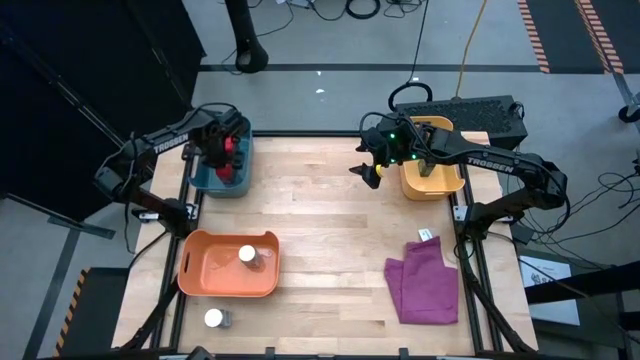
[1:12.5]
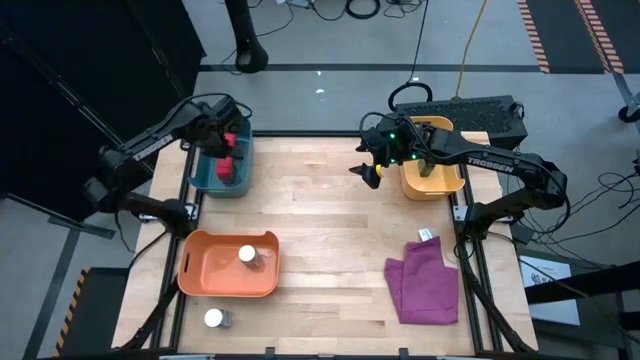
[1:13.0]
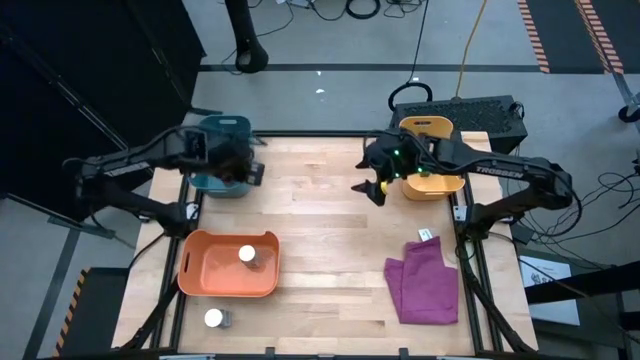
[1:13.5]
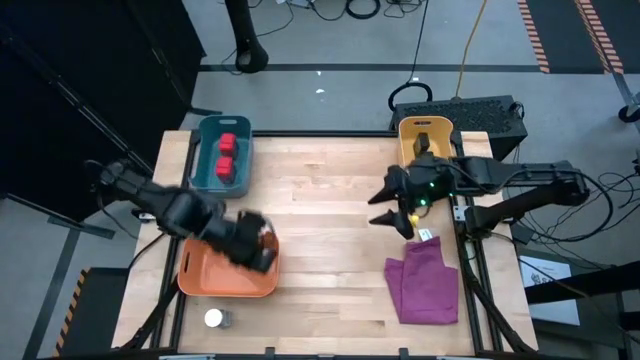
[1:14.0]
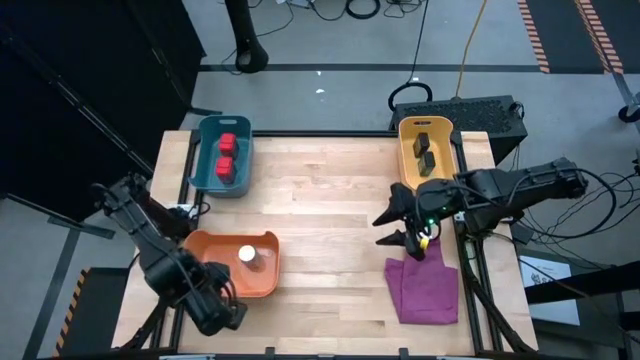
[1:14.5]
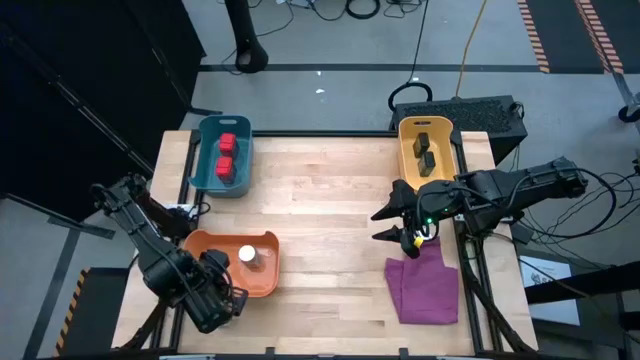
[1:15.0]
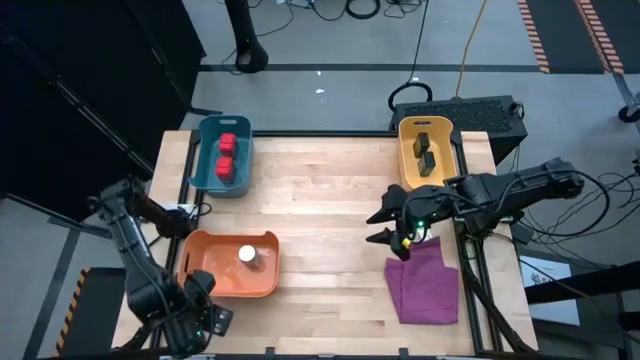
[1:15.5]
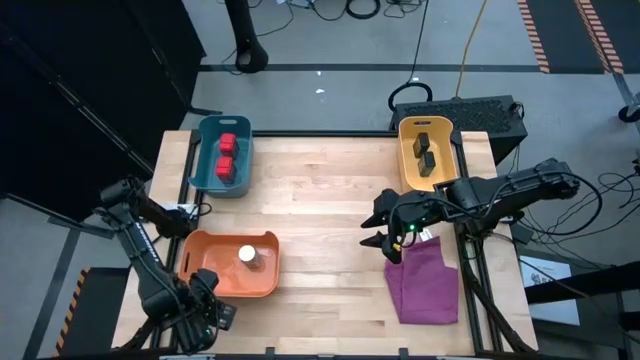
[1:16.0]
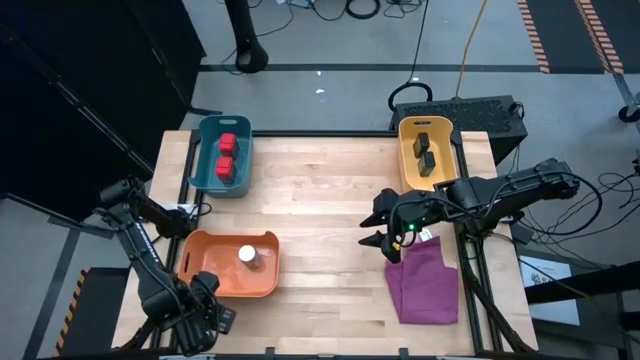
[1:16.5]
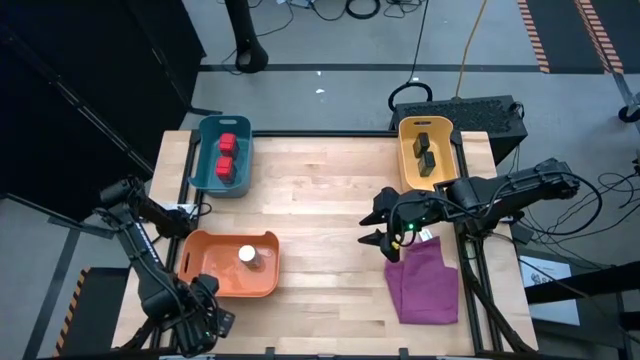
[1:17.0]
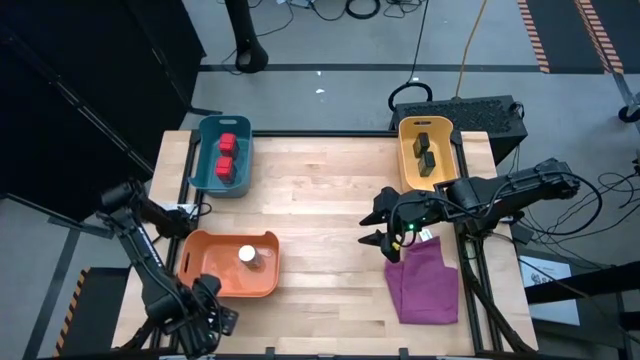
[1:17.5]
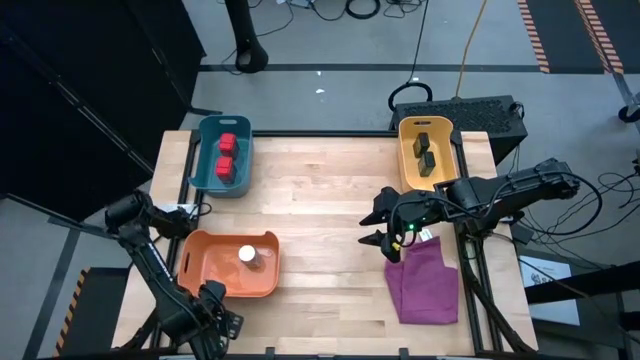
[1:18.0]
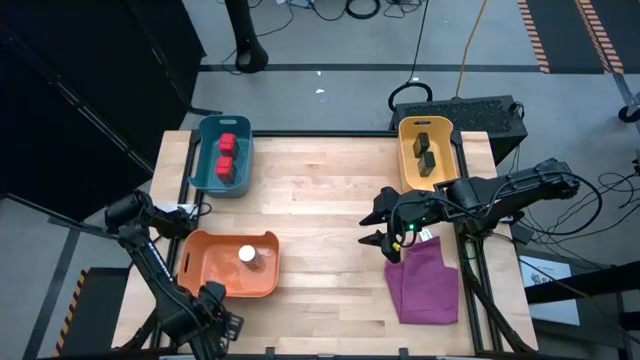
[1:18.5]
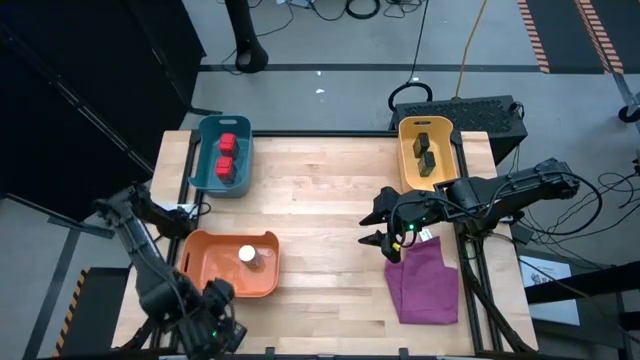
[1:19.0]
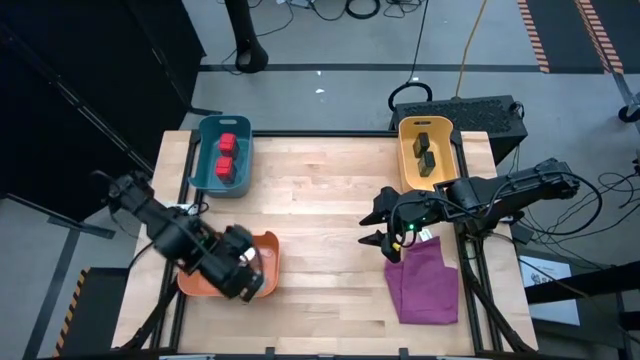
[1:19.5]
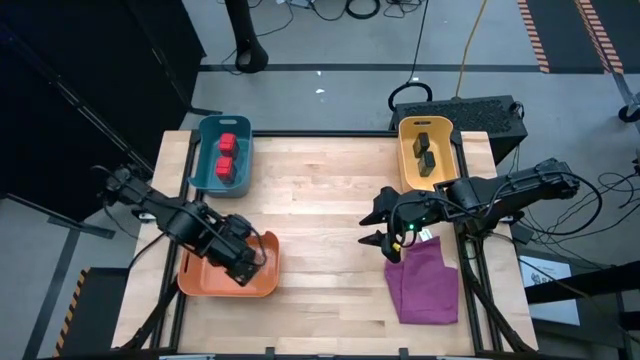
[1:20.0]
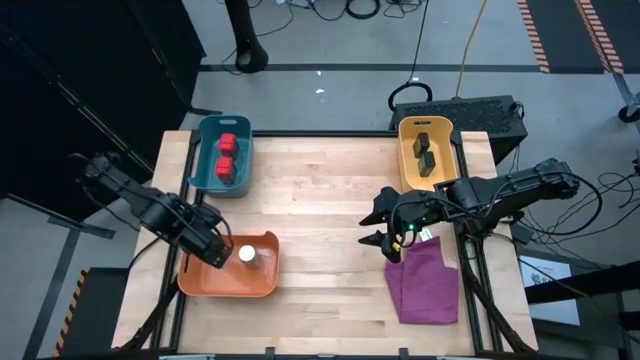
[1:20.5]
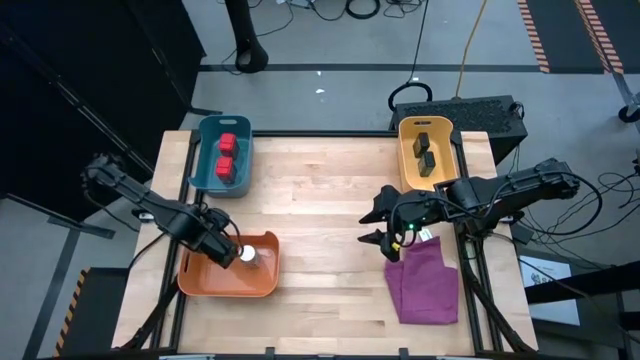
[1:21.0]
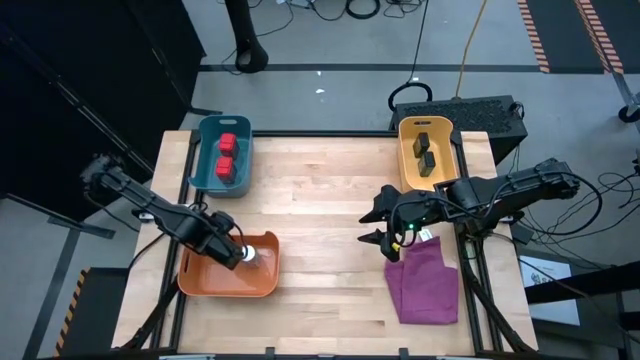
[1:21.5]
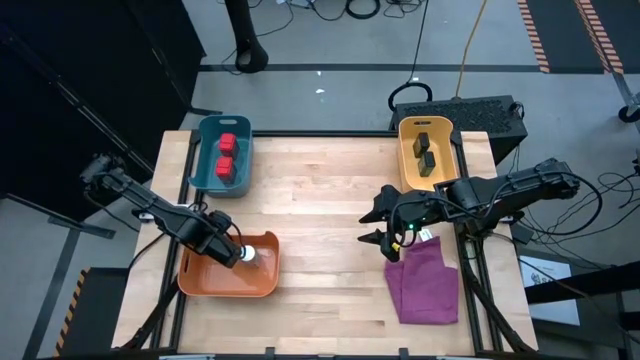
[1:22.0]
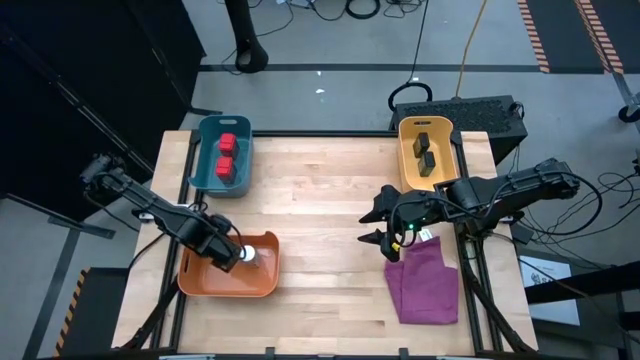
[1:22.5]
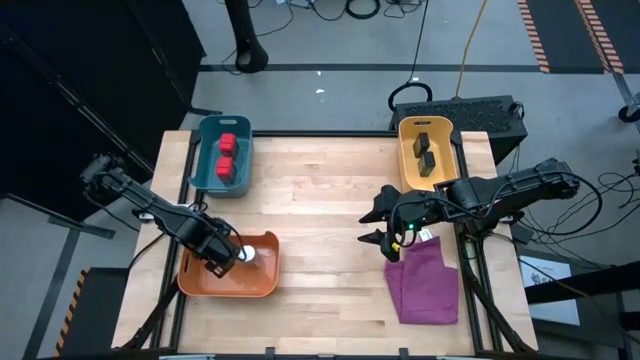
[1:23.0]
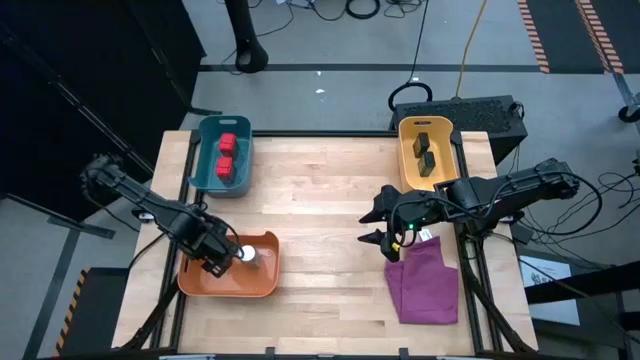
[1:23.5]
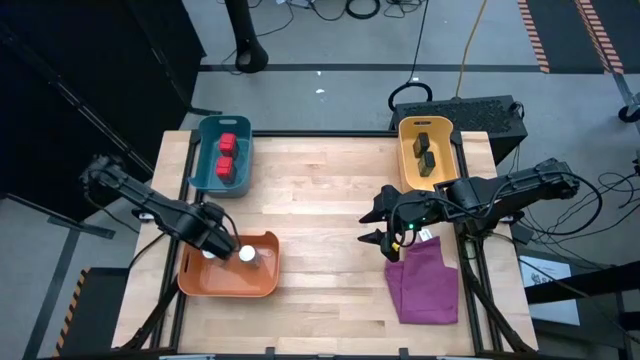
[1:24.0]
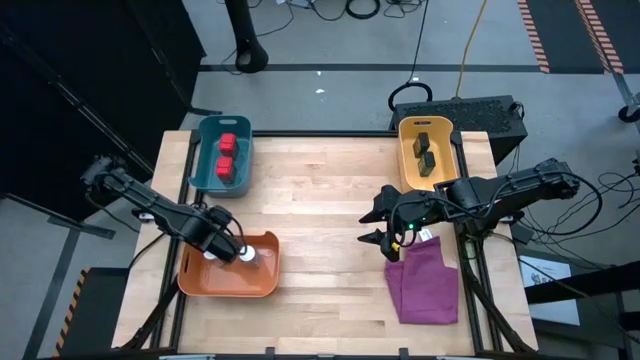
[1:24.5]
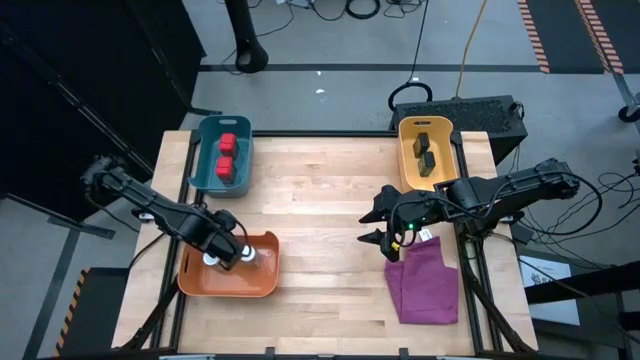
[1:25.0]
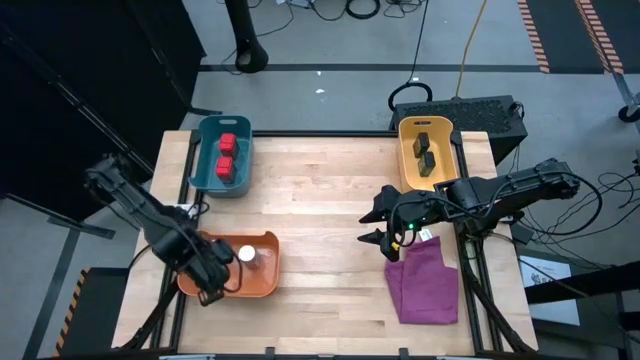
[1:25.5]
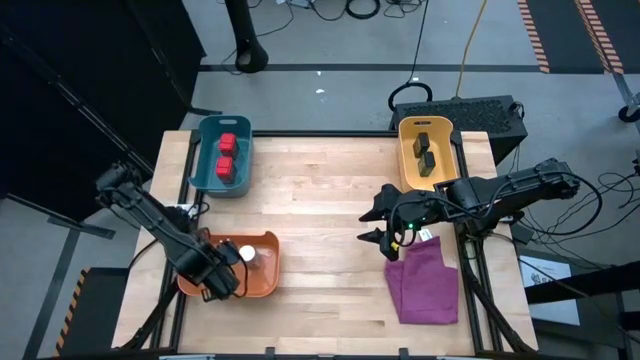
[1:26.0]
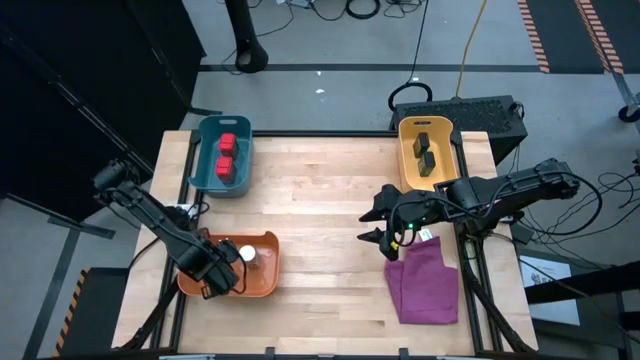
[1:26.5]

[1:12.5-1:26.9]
Task: Sort spices by type
Put the white seasoning bottle into the orange bin

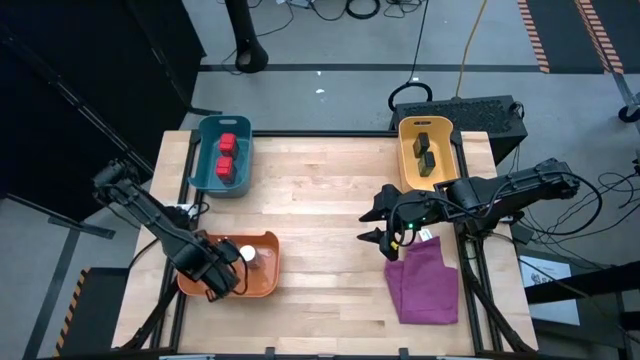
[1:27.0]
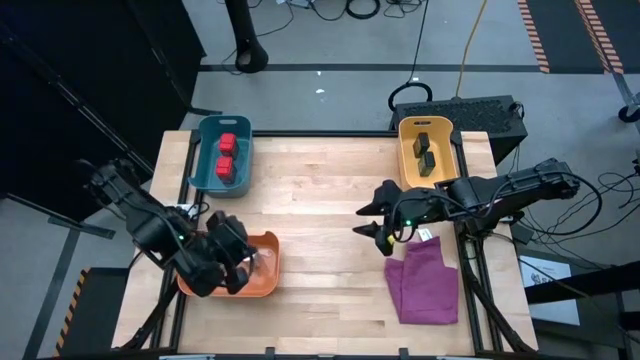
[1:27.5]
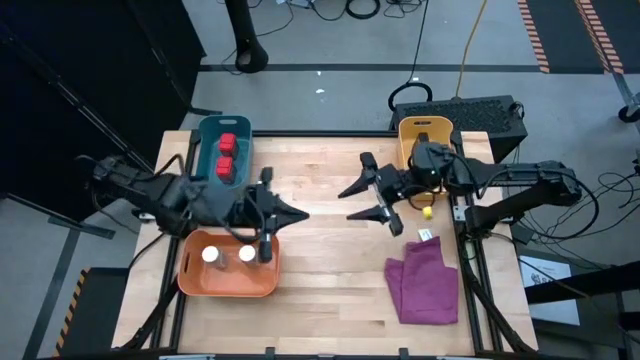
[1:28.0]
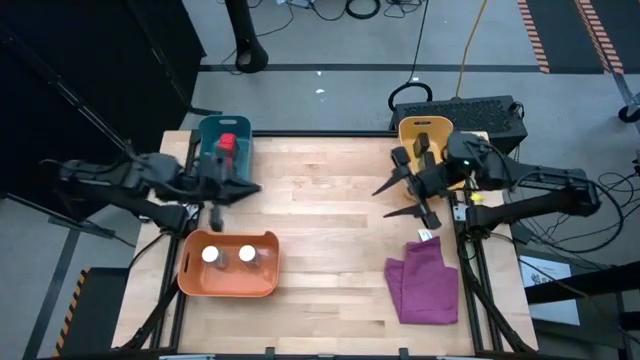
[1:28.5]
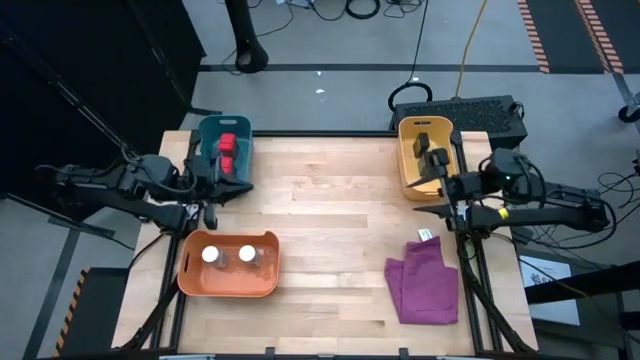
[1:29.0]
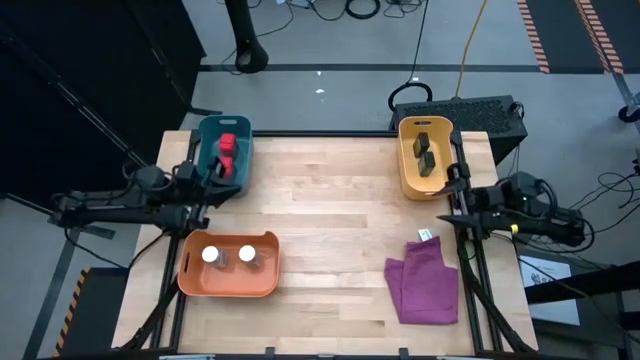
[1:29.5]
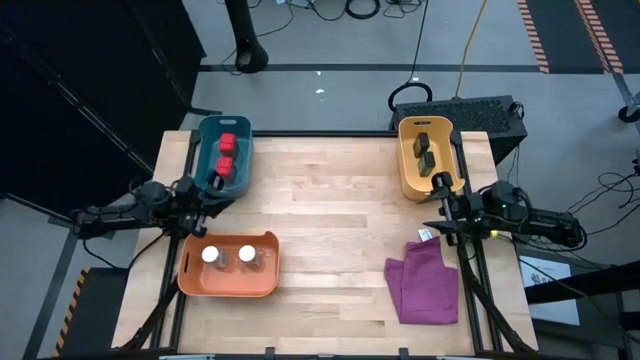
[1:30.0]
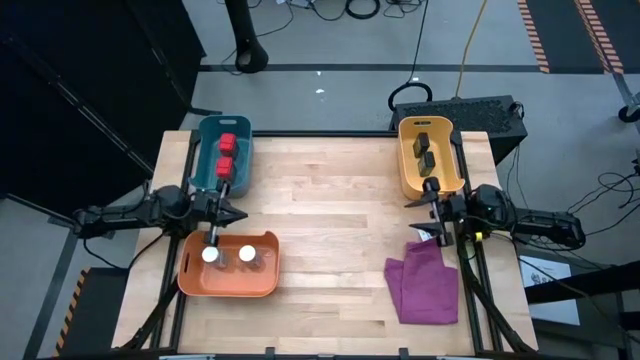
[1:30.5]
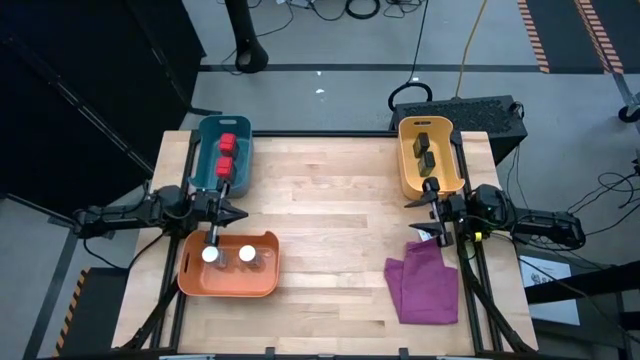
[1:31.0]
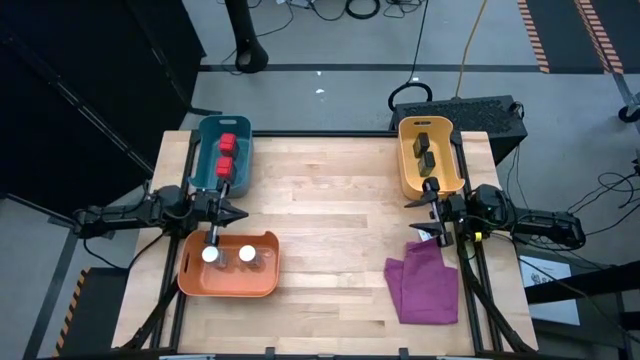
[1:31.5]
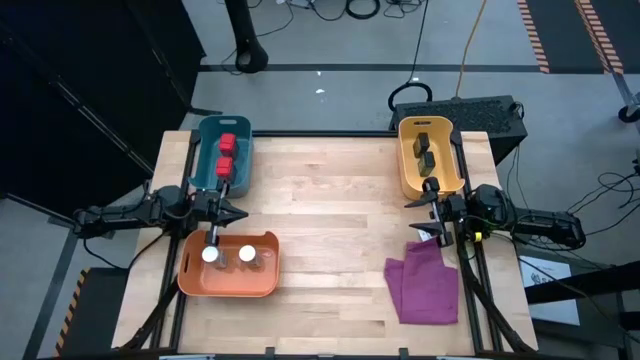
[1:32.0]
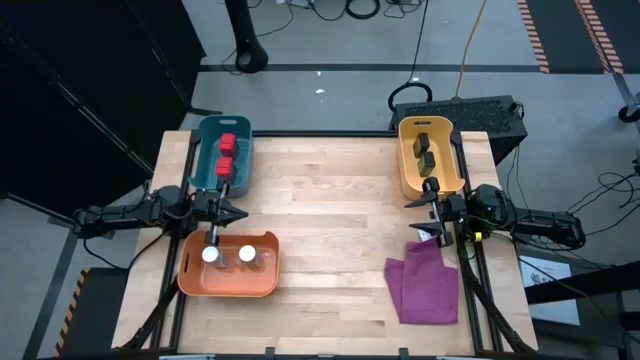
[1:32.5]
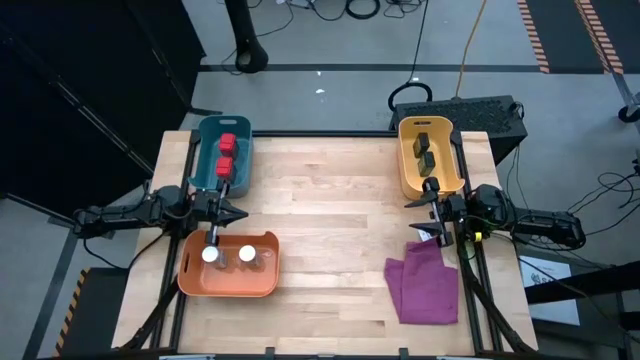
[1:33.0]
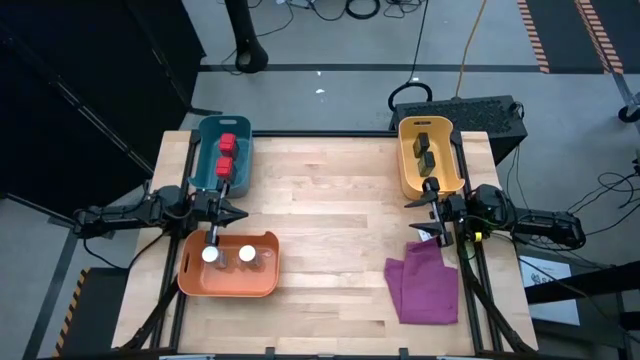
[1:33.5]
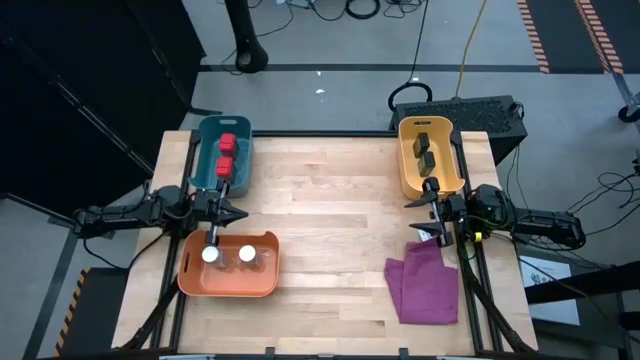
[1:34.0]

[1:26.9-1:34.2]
Return to Home Position
